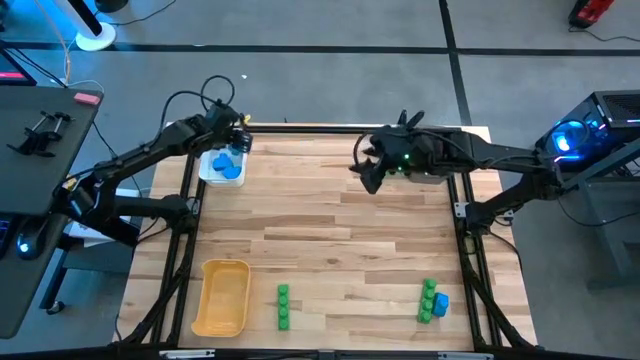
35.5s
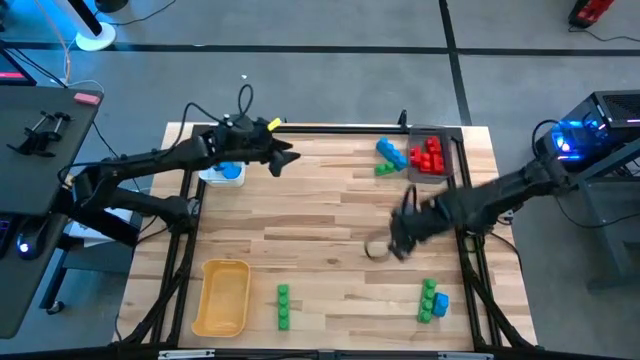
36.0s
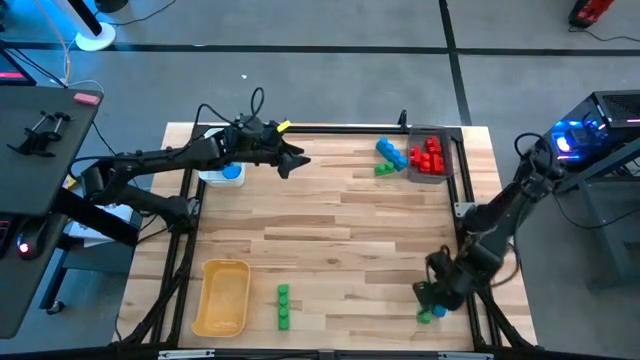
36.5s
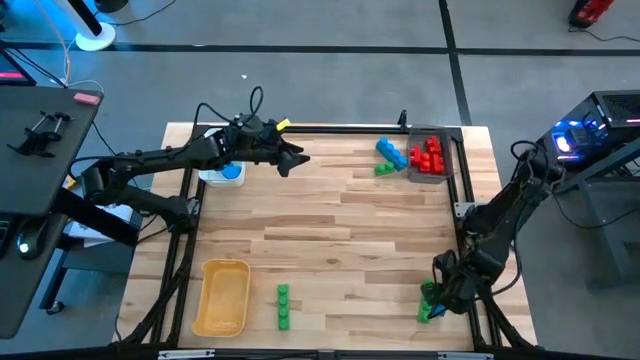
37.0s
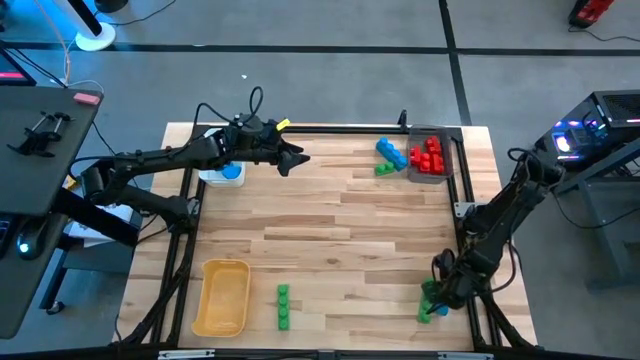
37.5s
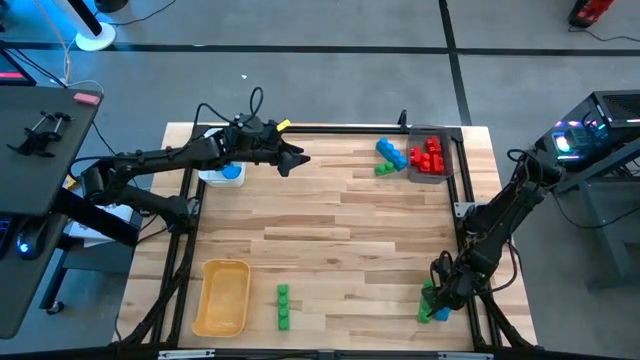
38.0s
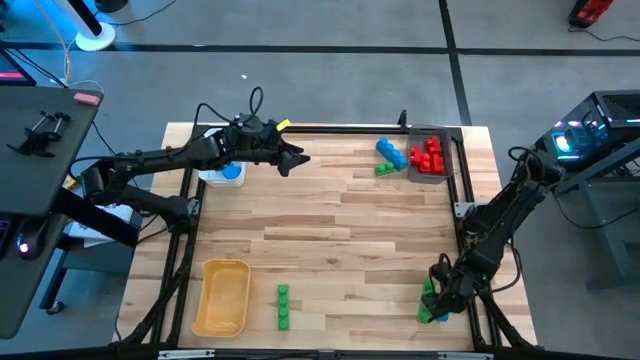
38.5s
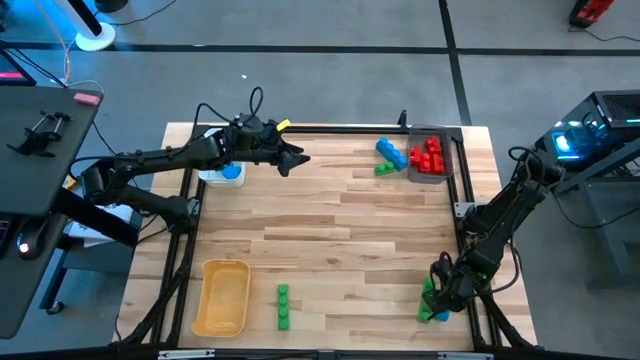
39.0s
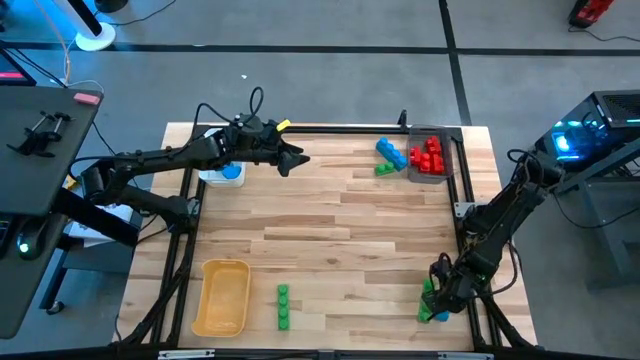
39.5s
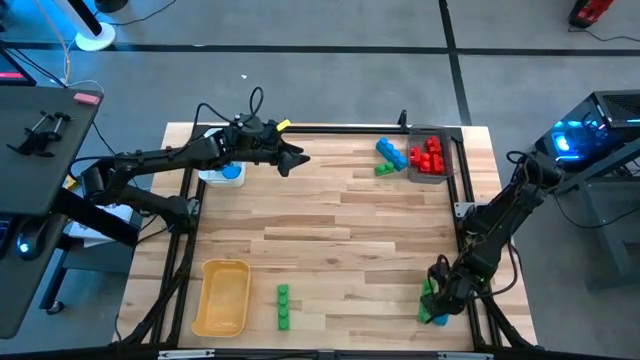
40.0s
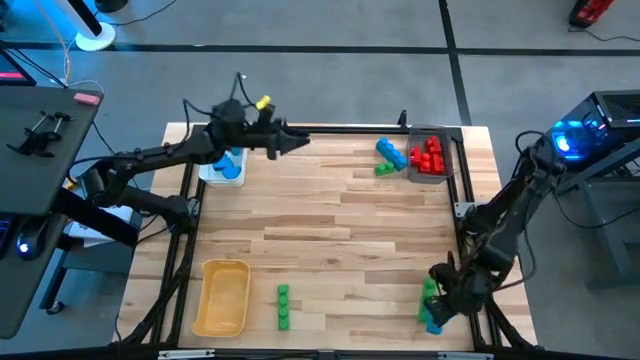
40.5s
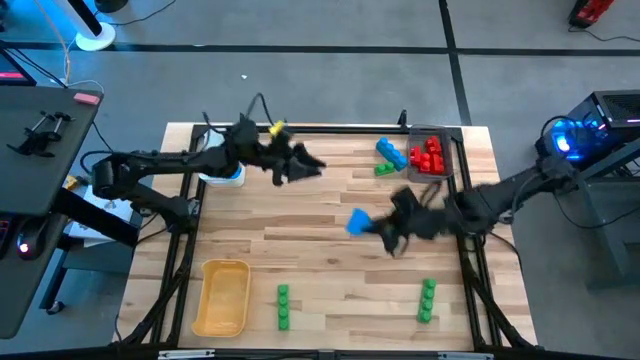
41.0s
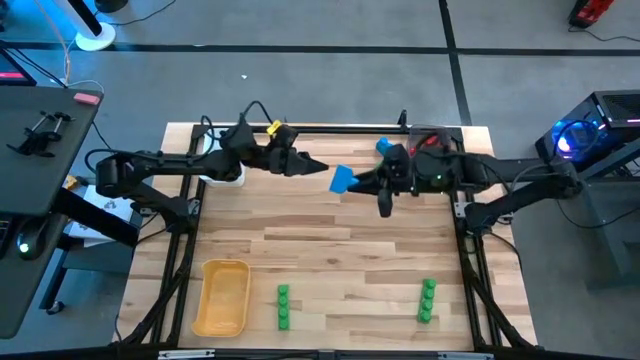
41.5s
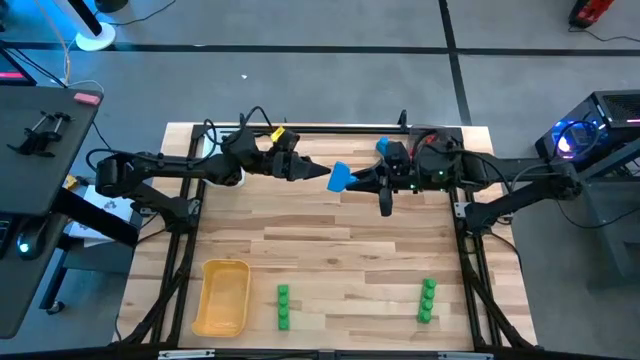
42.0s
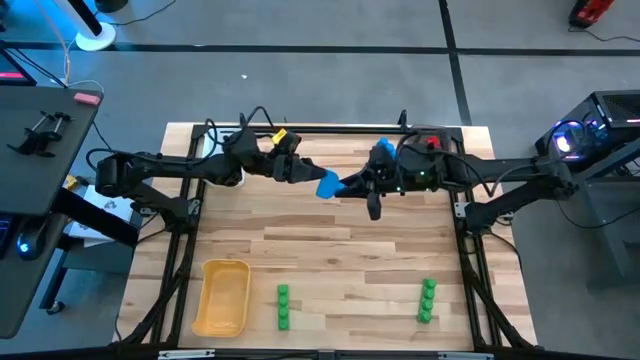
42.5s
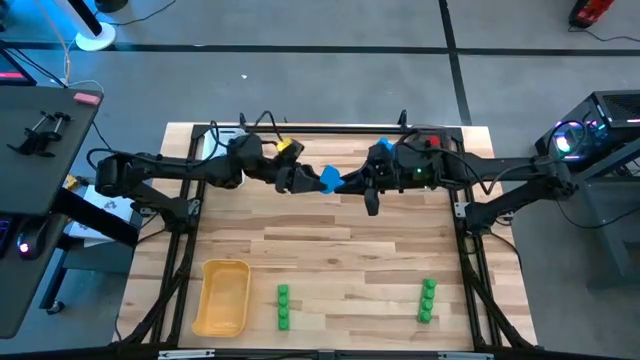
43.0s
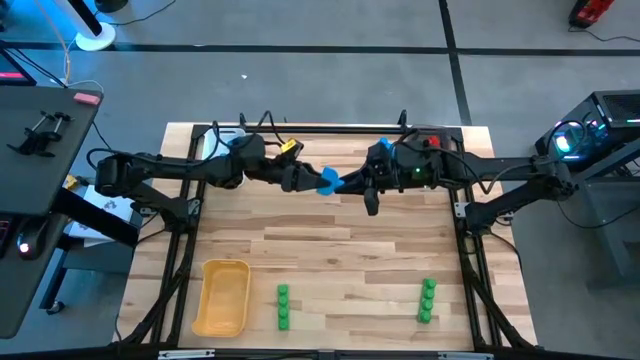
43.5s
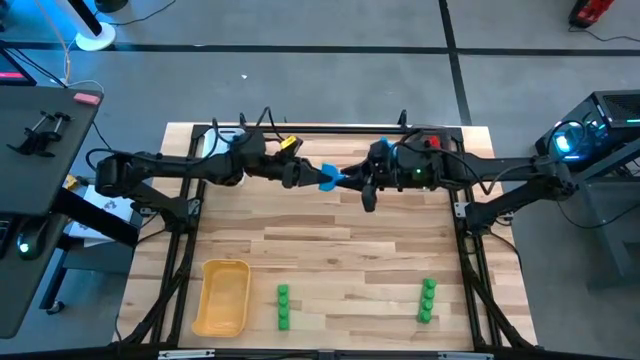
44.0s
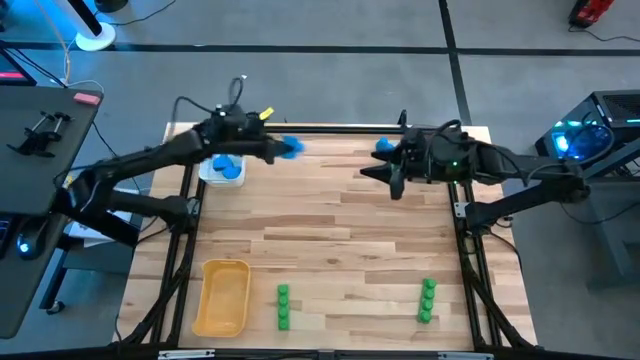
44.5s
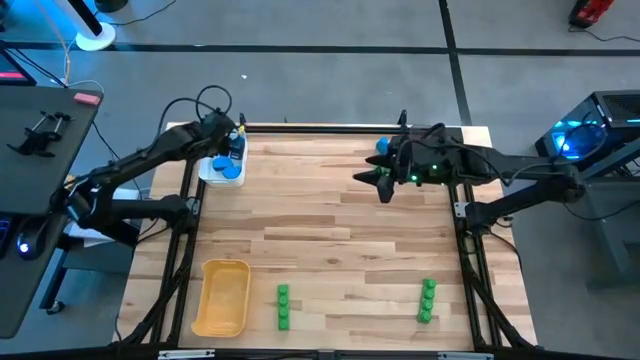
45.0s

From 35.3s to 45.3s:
Task: Sort blocks
Put the blue game piece into the white bin

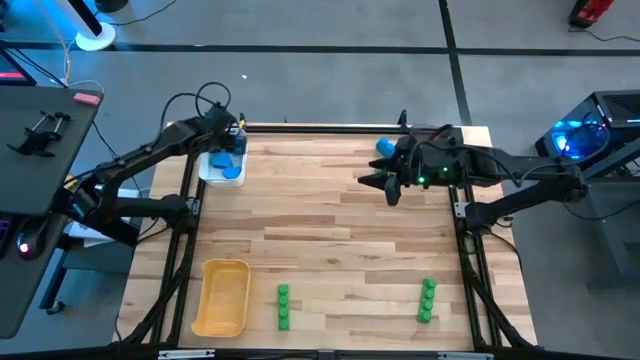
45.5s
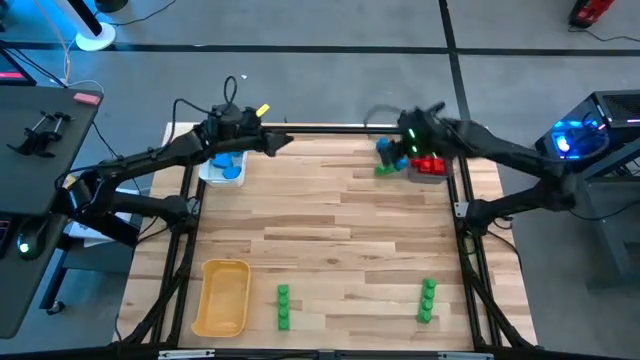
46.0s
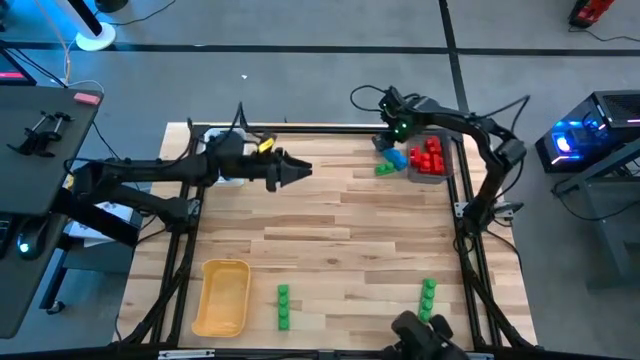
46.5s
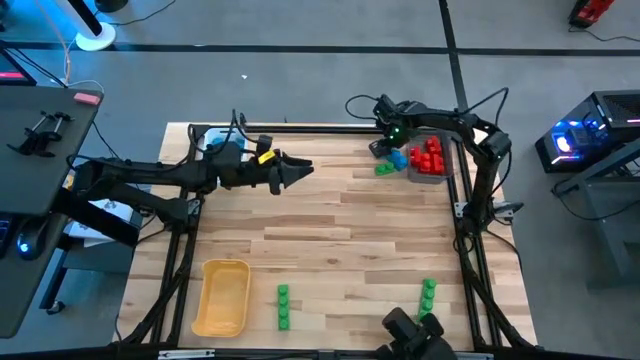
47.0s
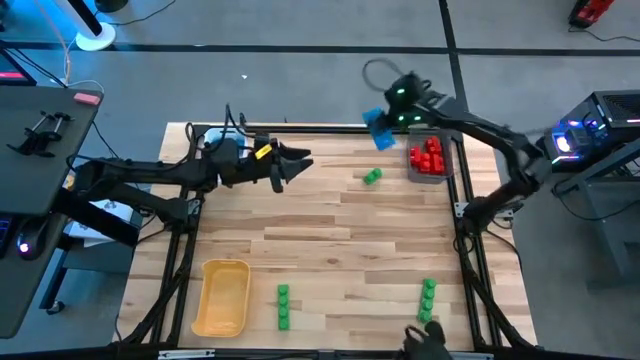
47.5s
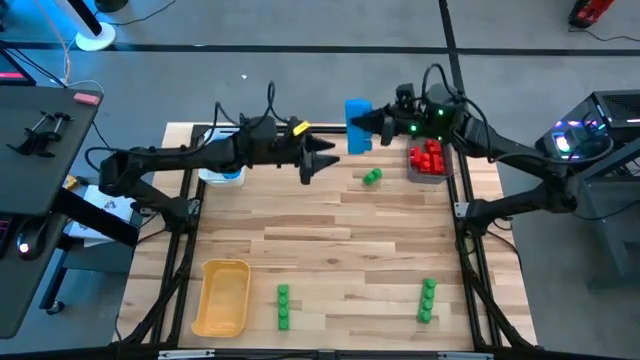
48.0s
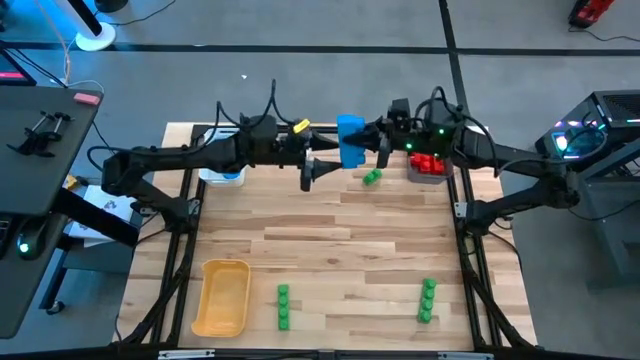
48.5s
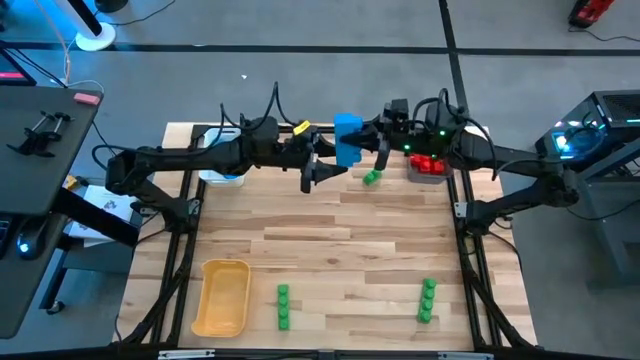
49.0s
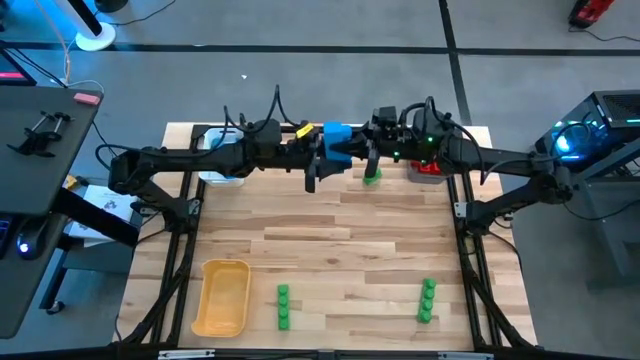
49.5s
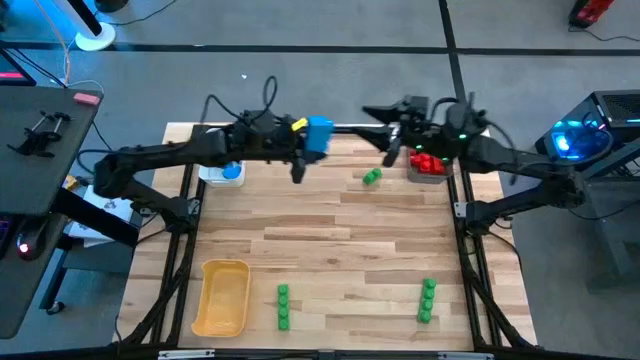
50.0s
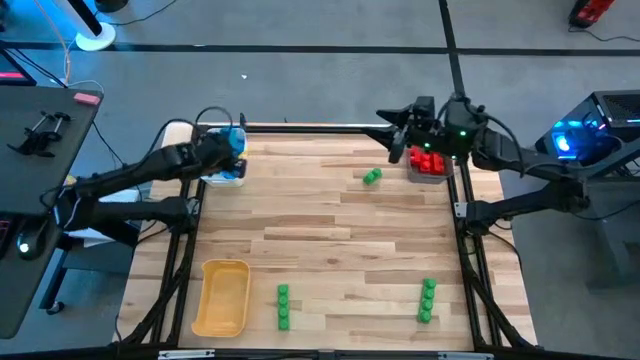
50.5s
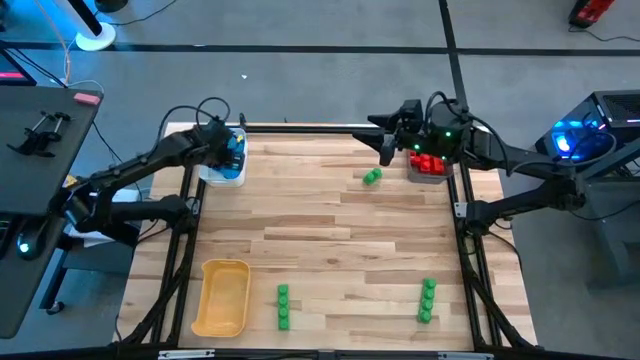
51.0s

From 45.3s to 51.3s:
Put the blue game piece into the white bin

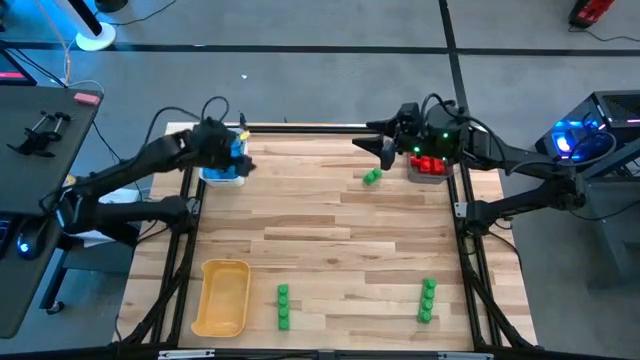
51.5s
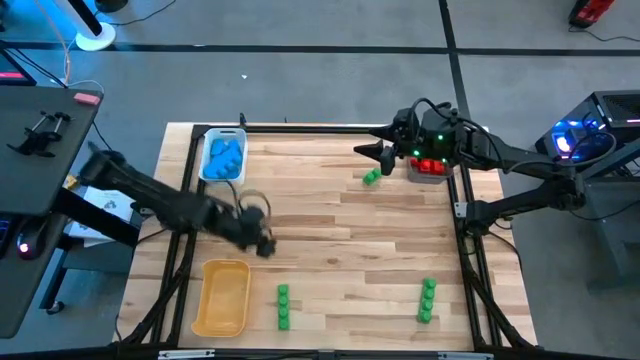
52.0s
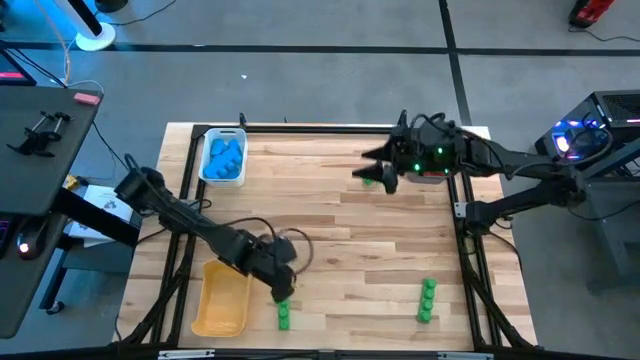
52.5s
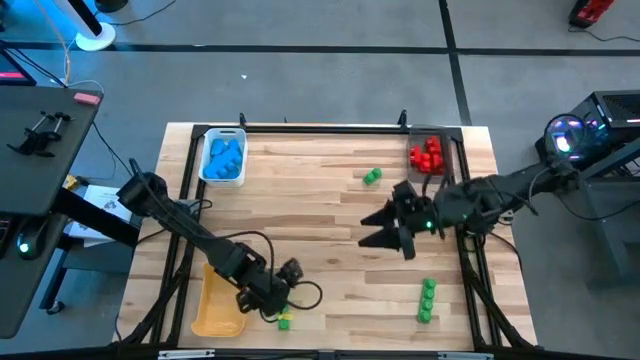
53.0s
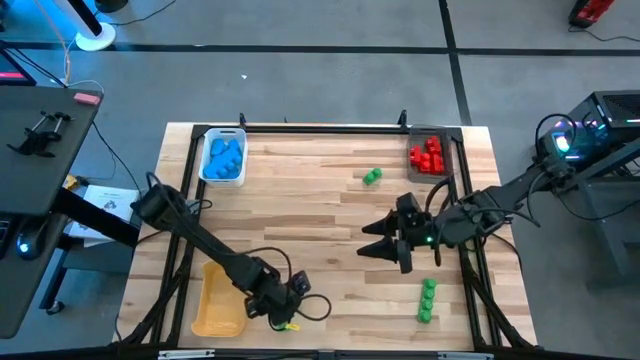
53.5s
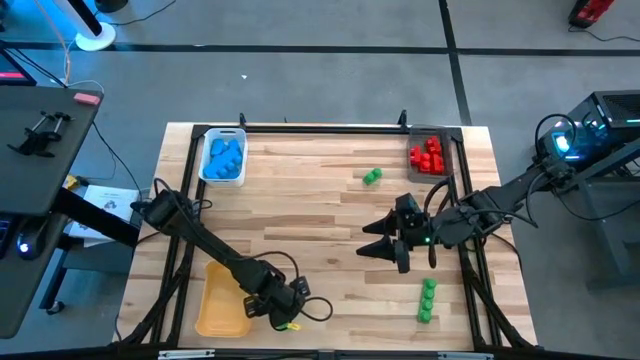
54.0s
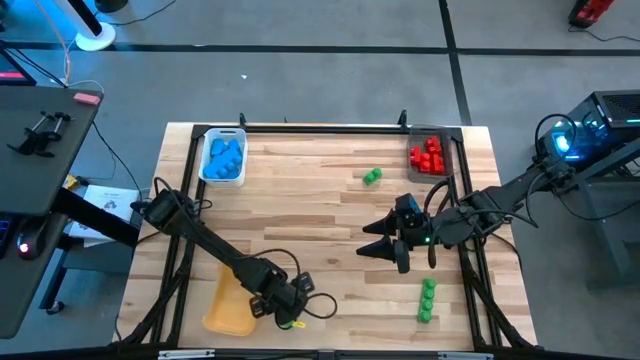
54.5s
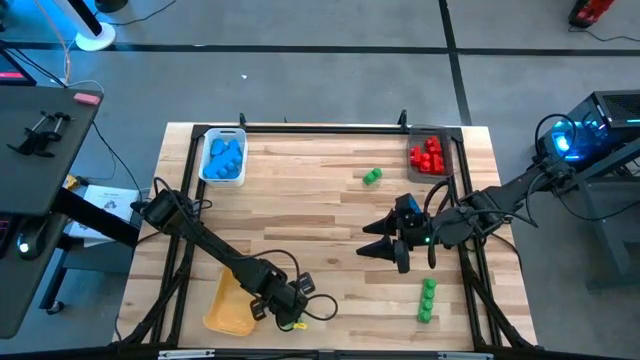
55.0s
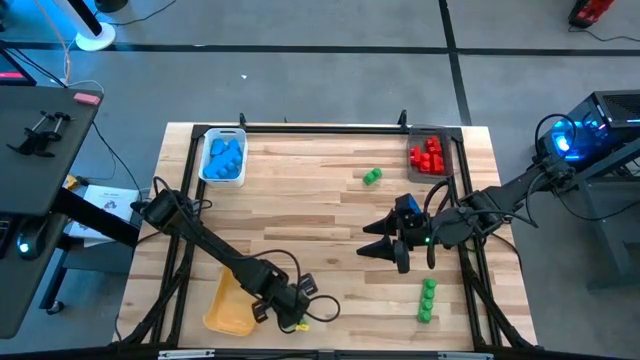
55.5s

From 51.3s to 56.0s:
Put the green game piece into the yellow bin

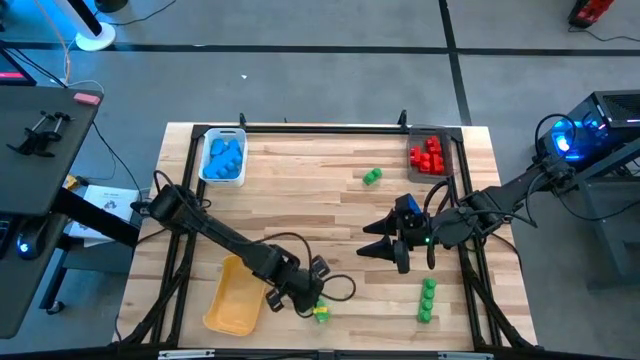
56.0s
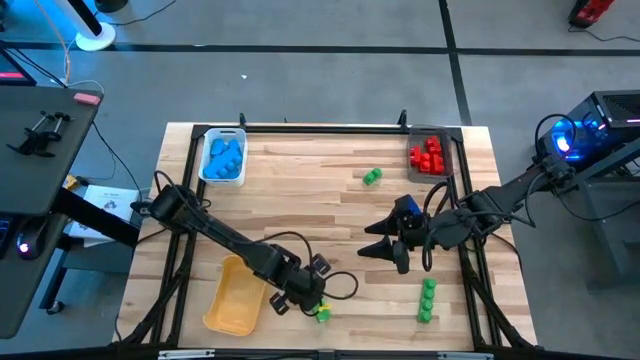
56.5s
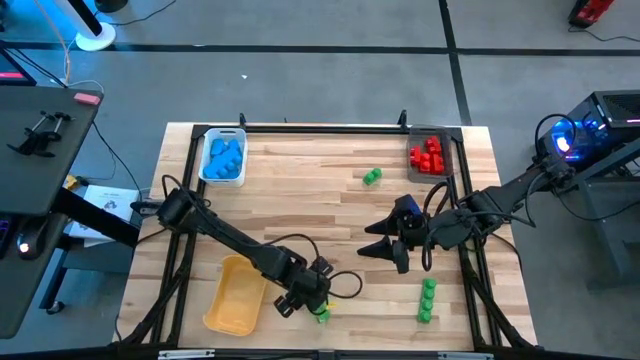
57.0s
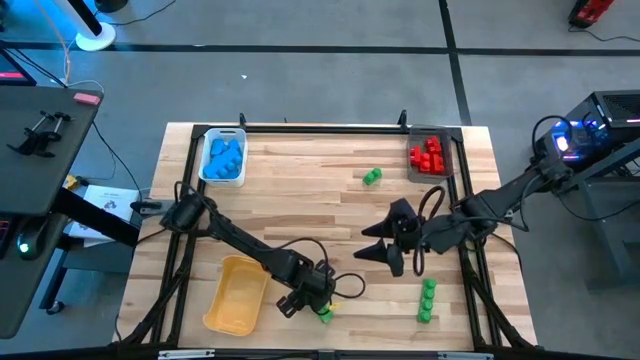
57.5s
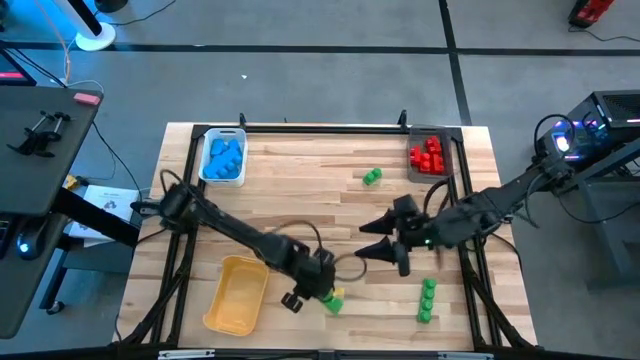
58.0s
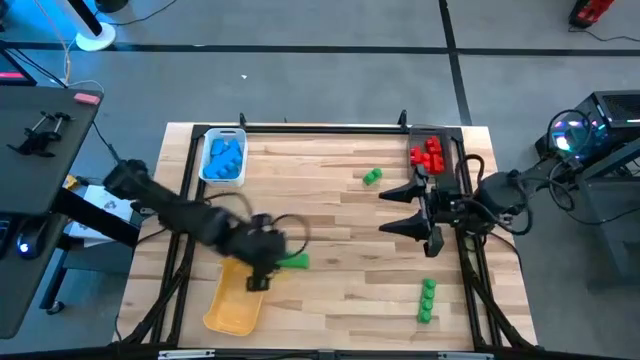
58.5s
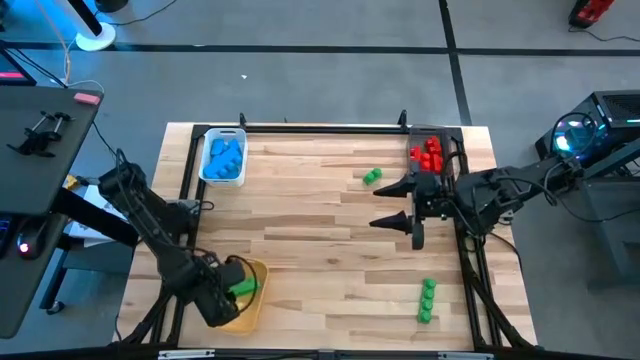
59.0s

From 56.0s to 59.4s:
Put the green game piece into the yellow bin
